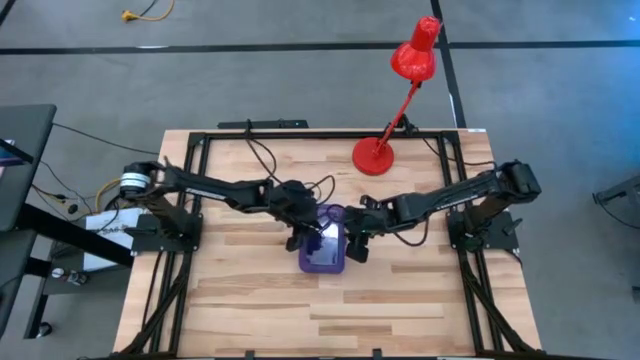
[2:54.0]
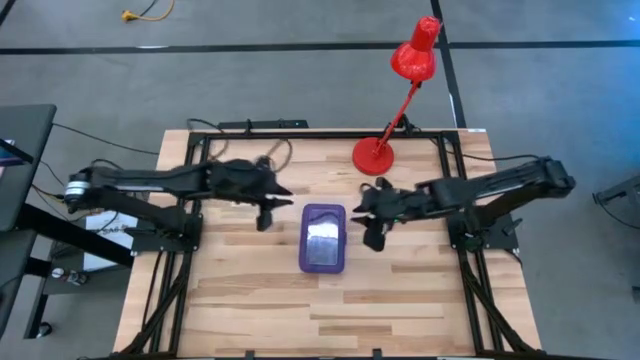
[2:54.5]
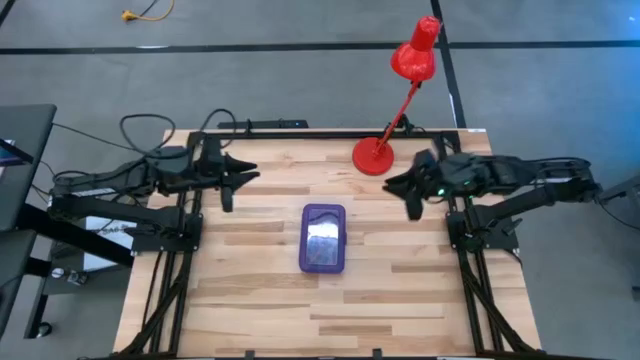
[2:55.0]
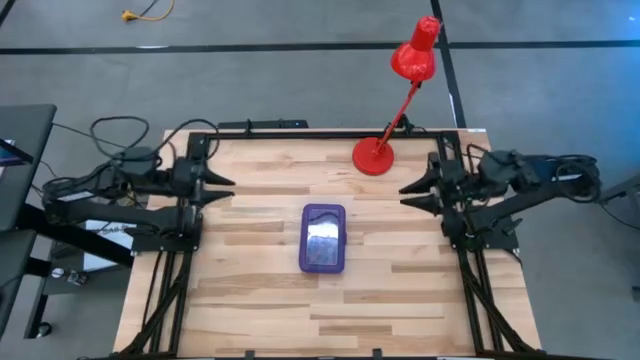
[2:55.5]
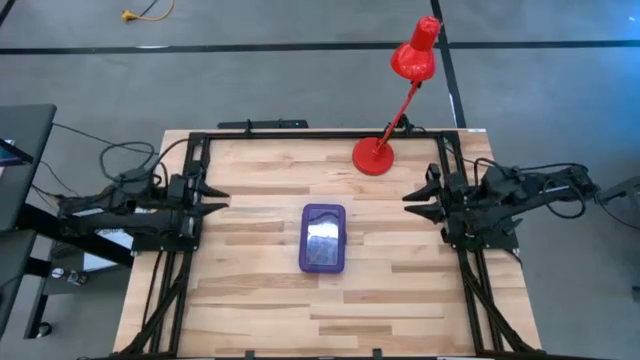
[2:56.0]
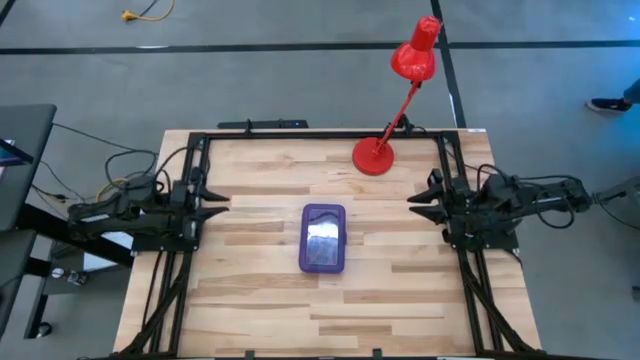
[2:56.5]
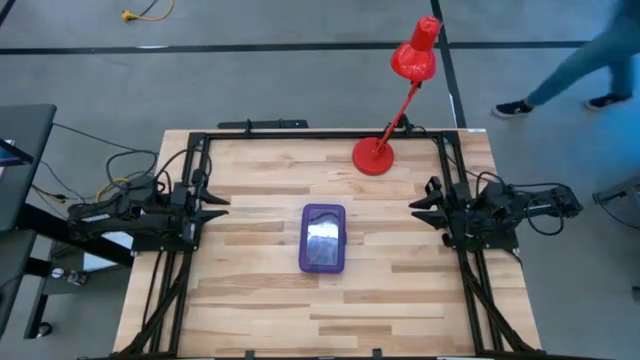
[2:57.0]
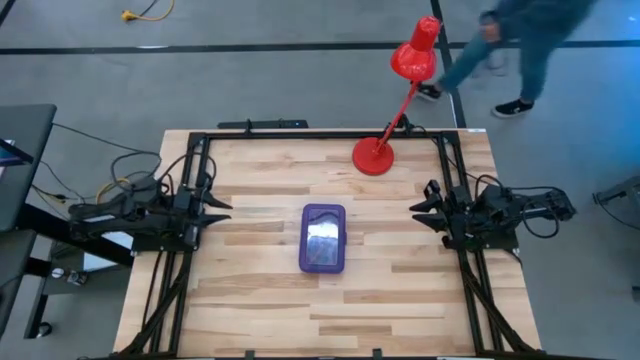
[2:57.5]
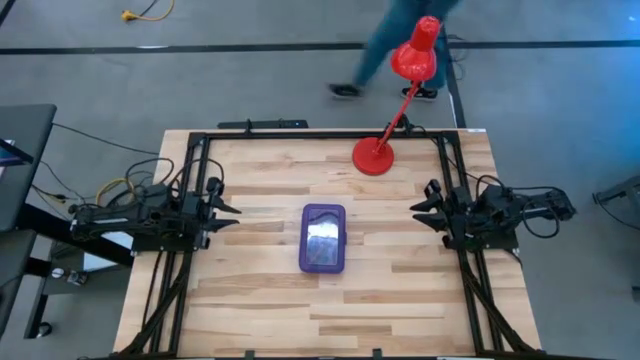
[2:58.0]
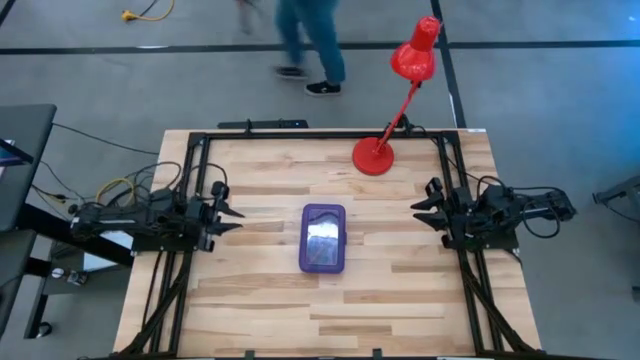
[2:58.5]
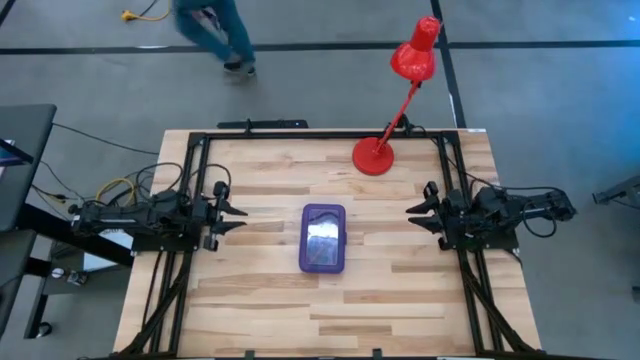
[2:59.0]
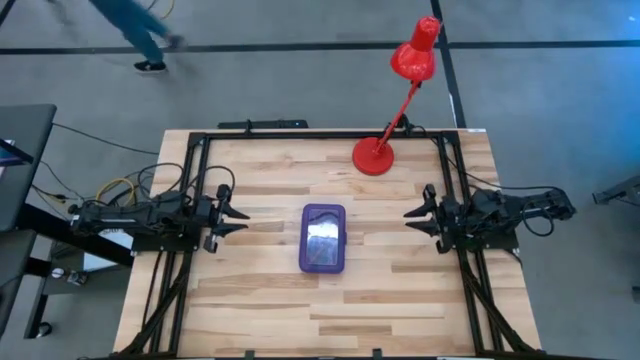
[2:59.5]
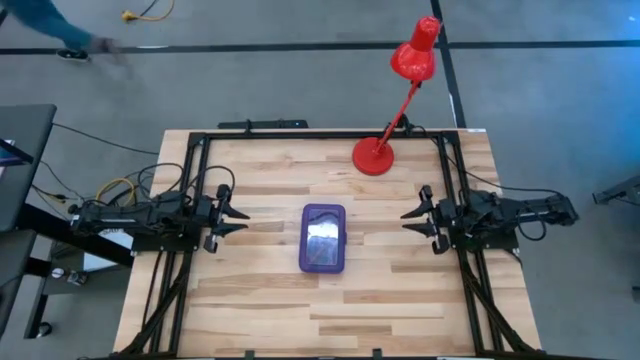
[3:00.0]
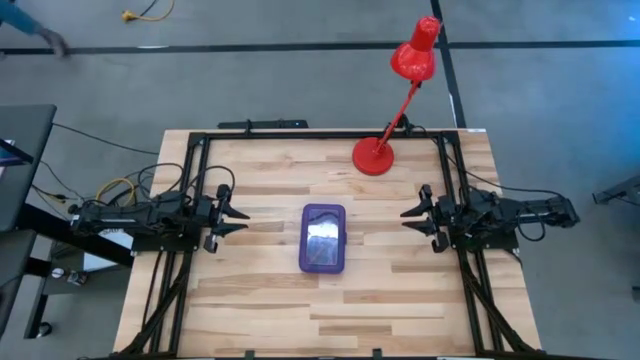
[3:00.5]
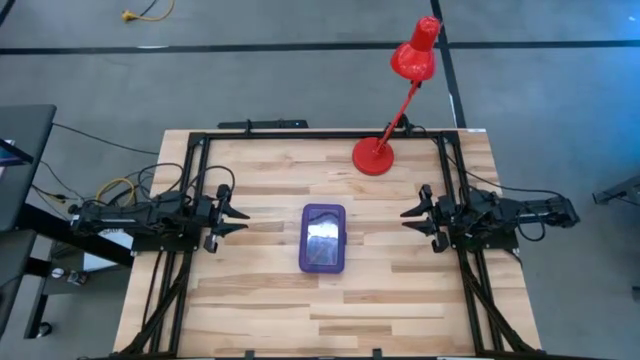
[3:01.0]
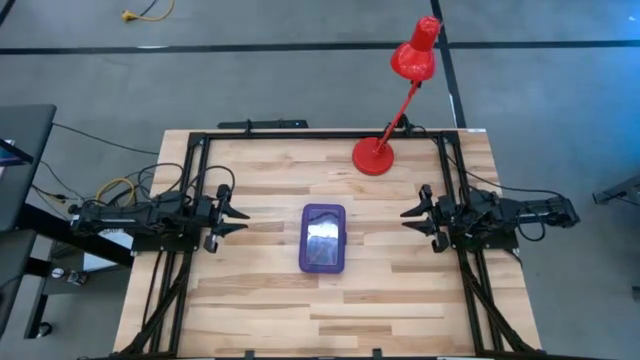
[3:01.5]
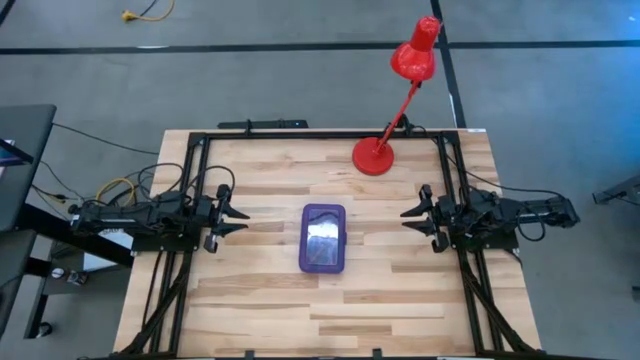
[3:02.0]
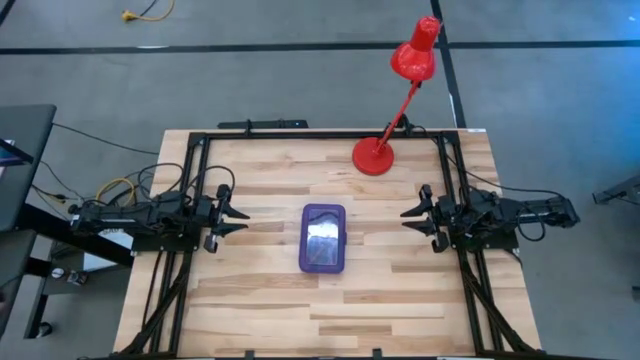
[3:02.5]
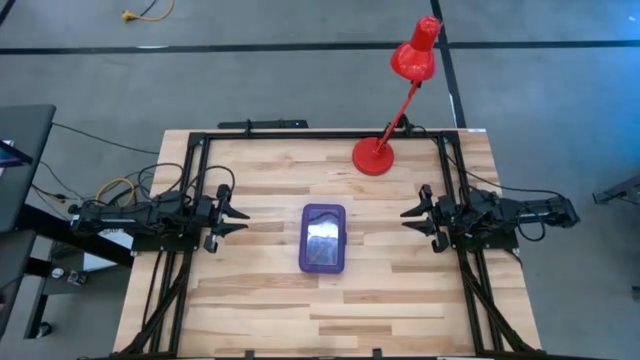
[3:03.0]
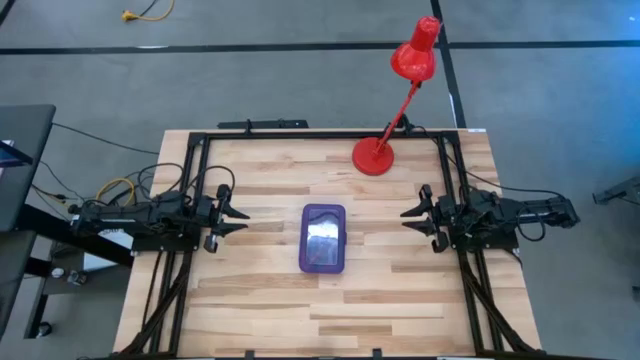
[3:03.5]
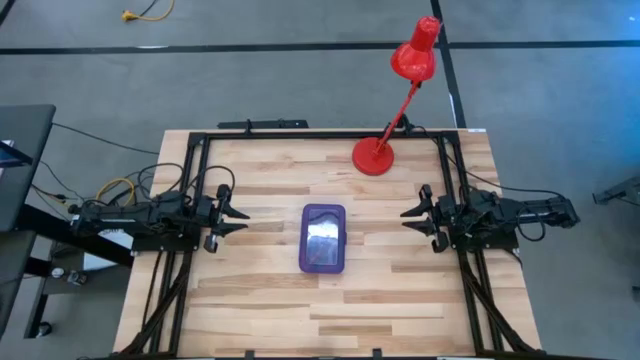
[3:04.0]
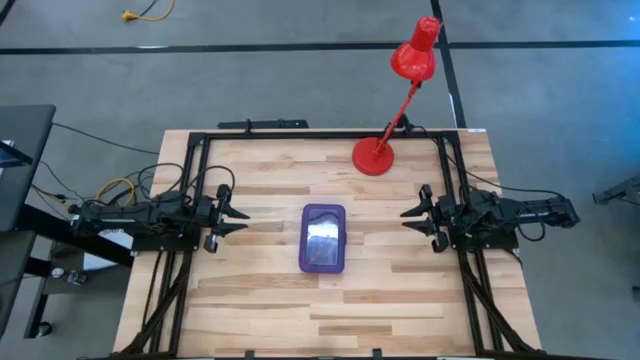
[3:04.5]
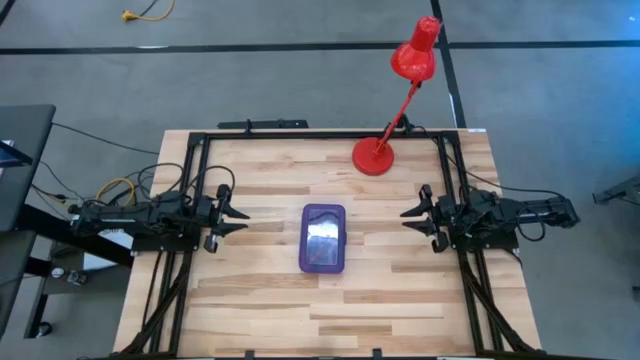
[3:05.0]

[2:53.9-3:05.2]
Task: Pick & place school supplies into a supply box
Return to Home Position

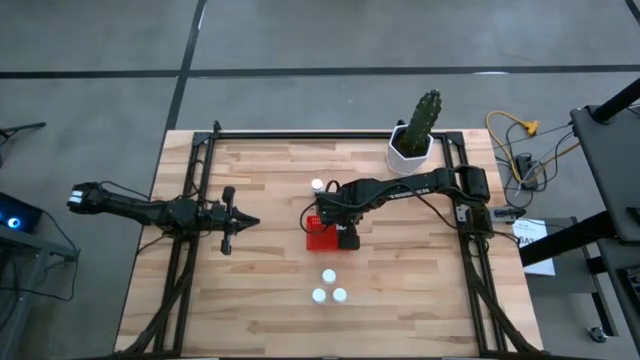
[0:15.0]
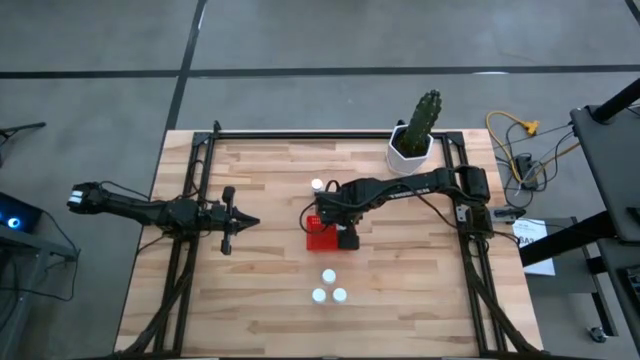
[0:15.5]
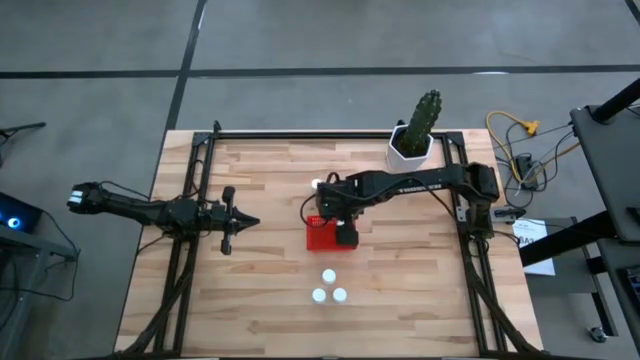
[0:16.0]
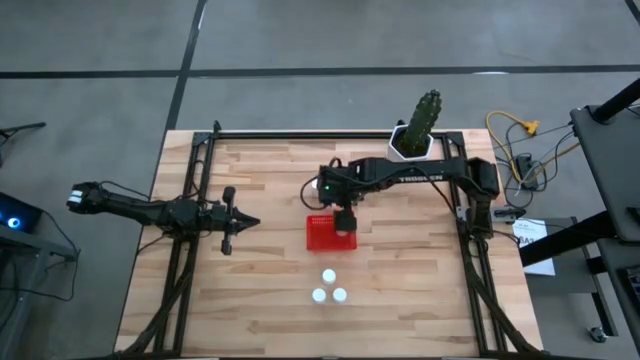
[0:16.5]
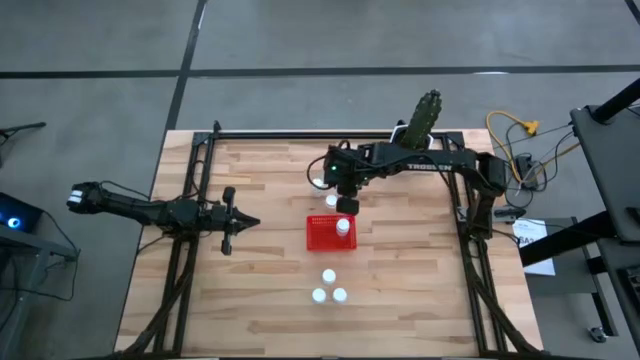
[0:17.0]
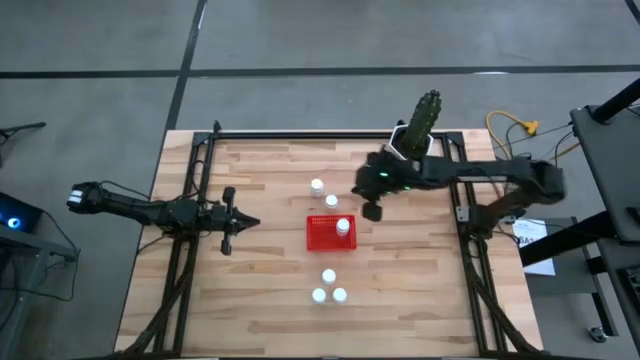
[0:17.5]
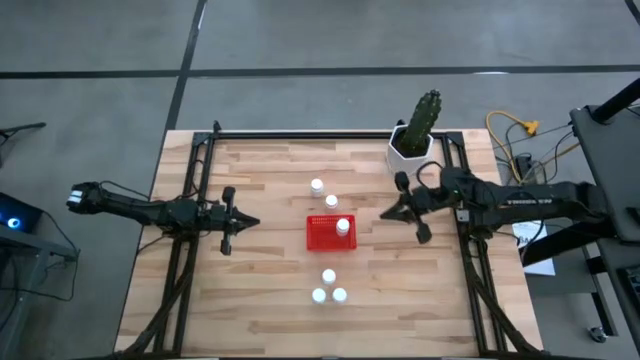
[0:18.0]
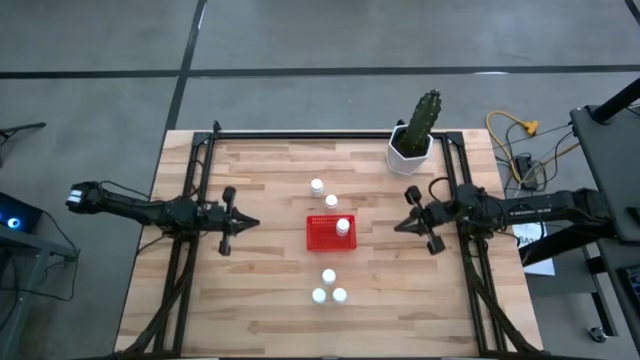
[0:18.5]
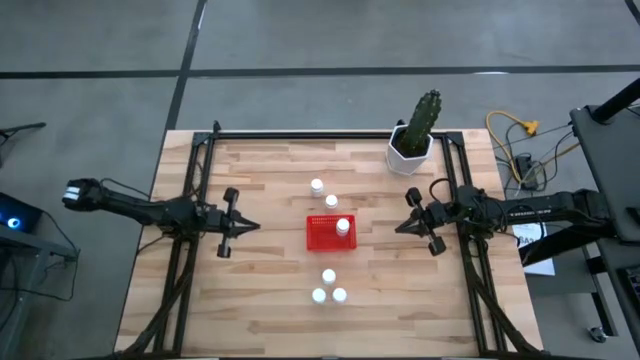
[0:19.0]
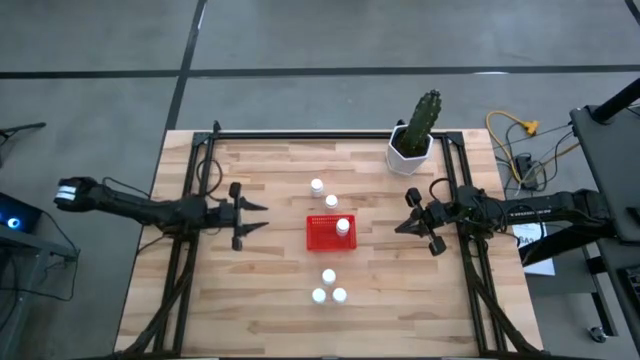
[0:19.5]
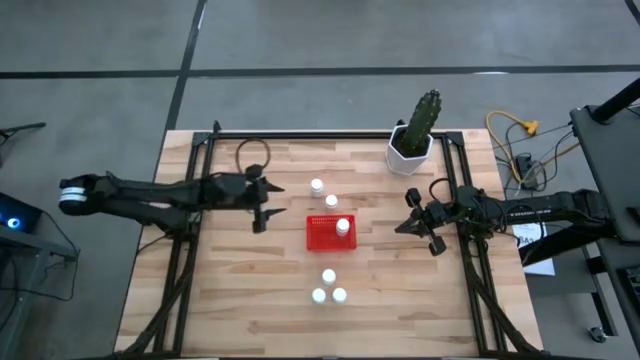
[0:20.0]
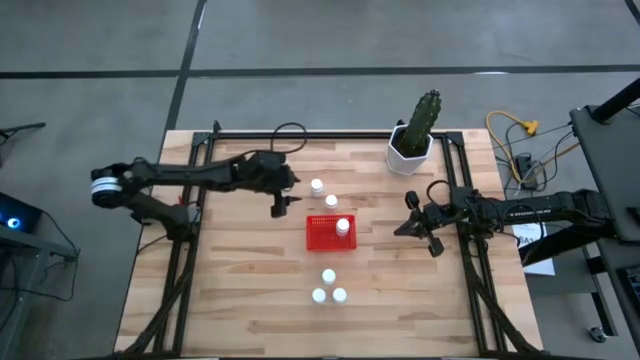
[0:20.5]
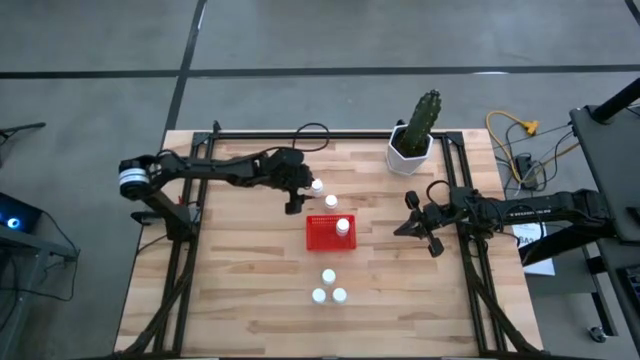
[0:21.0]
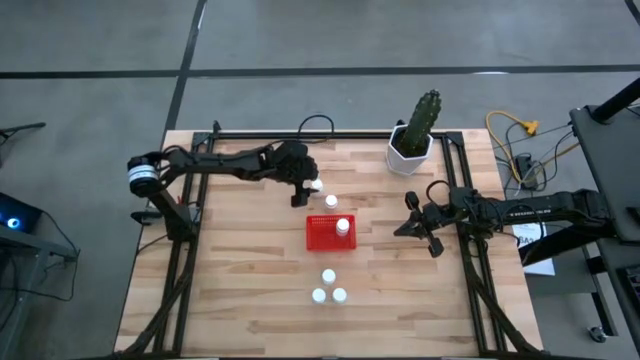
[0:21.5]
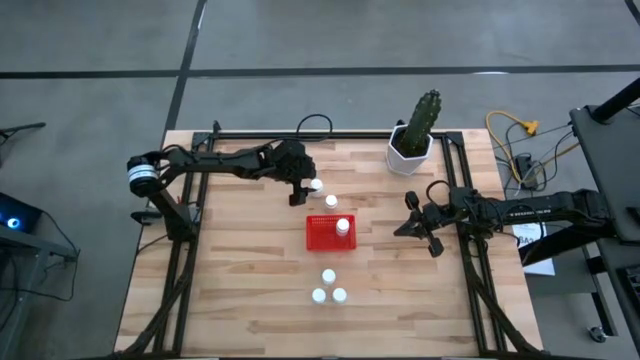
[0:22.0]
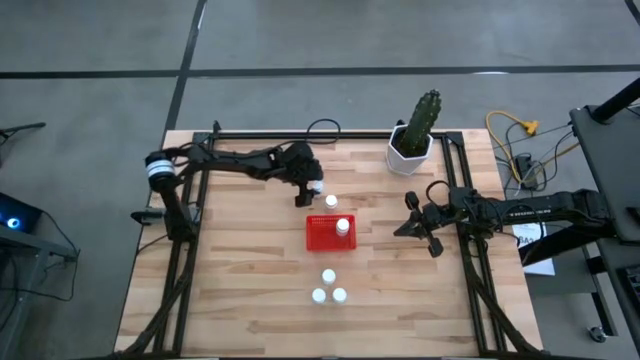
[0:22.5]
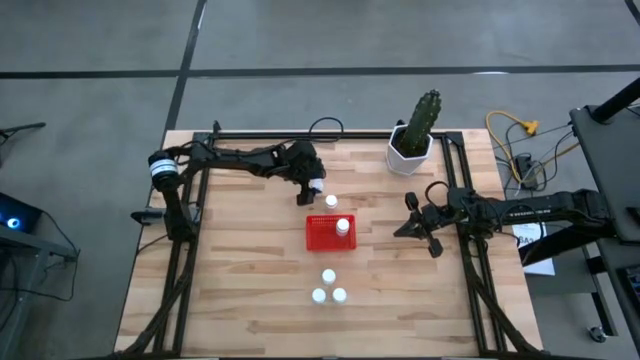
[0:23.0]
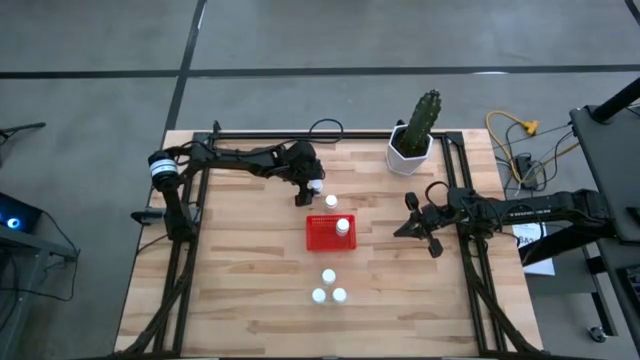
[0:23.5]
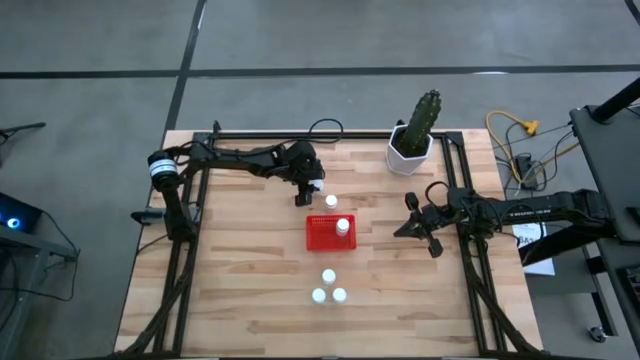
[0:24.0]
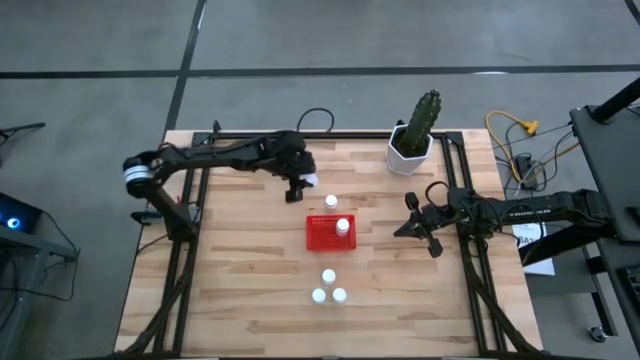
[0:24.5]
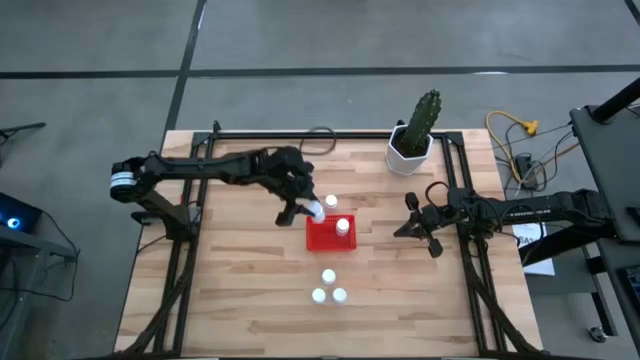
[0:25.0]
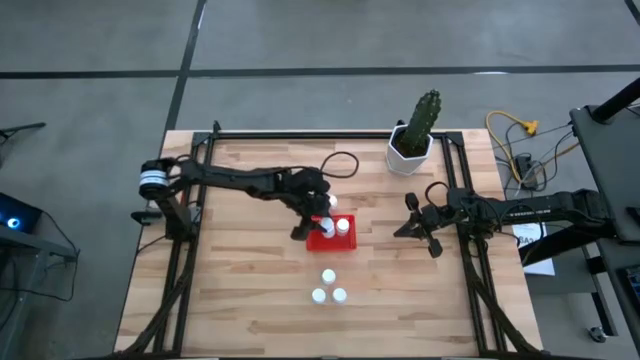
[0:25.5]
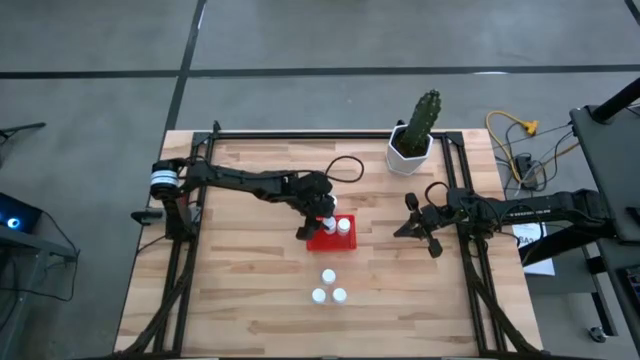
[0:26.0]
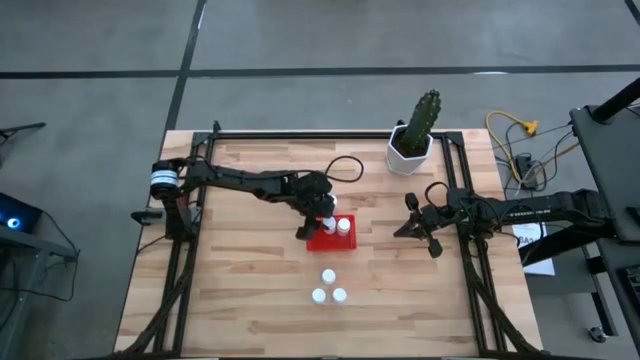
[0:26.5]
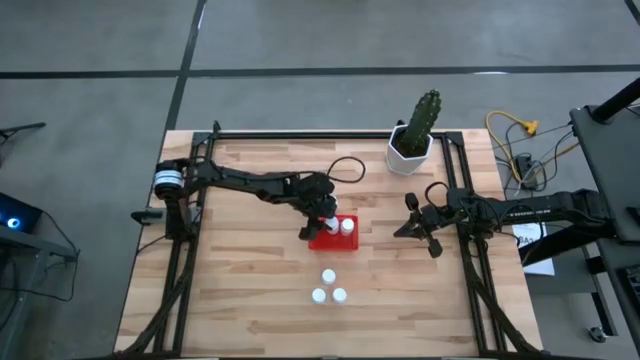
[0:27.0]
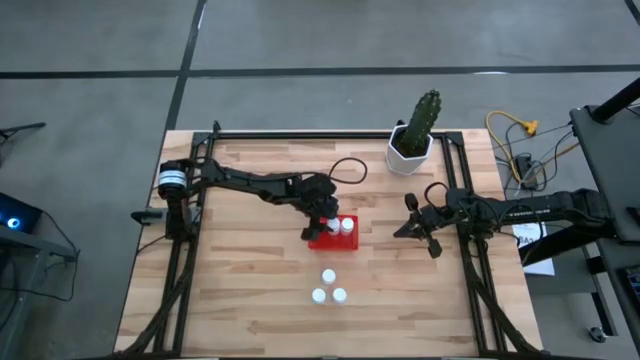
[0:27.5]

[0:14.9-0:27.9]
Task: Pick and place pill bottles into a basket
Put the white pill bottle into the red basket
